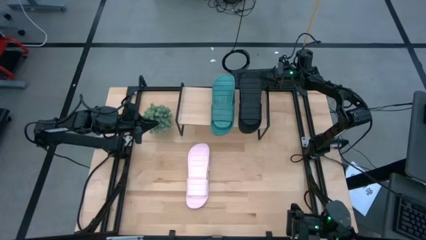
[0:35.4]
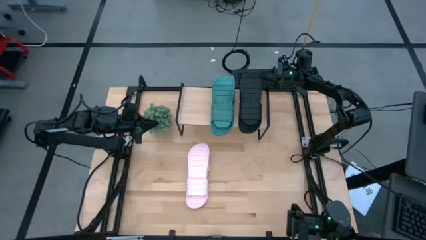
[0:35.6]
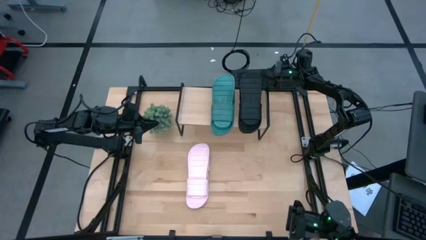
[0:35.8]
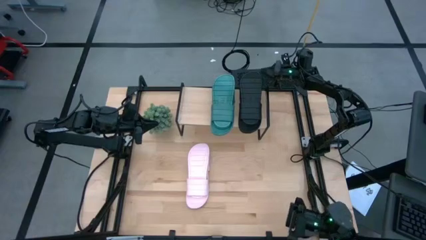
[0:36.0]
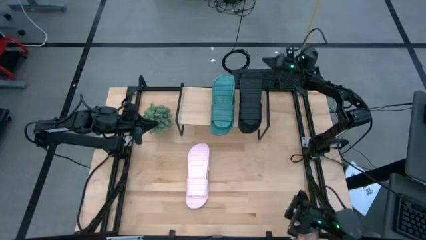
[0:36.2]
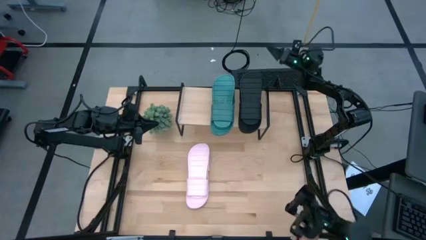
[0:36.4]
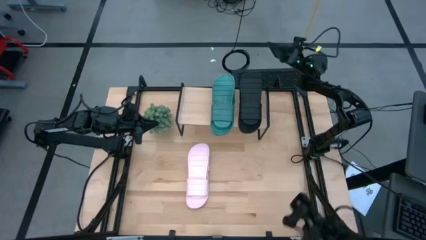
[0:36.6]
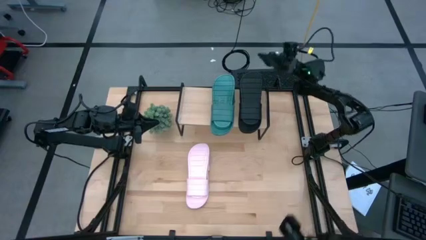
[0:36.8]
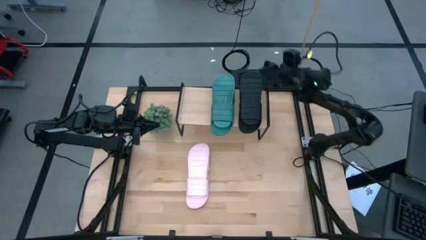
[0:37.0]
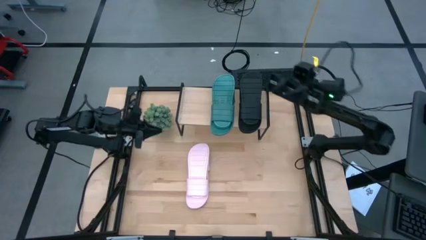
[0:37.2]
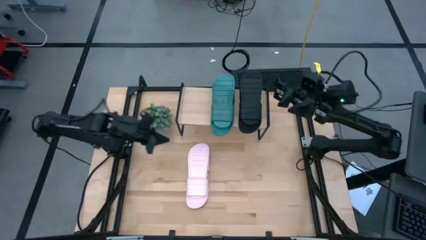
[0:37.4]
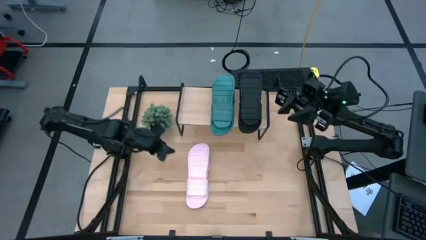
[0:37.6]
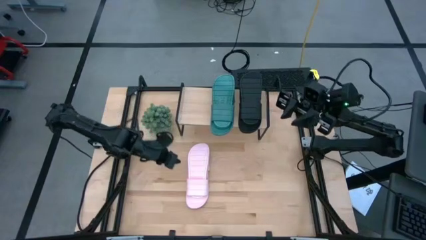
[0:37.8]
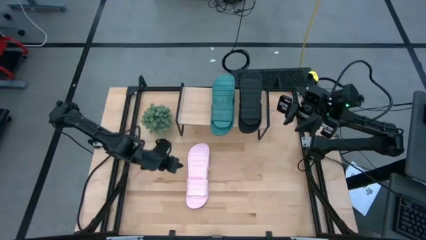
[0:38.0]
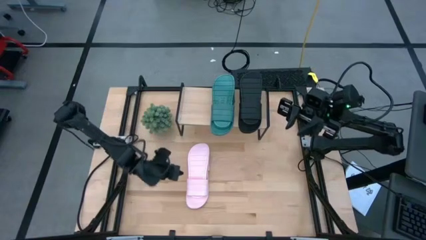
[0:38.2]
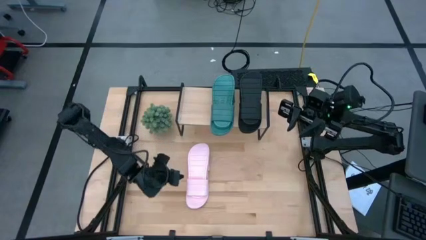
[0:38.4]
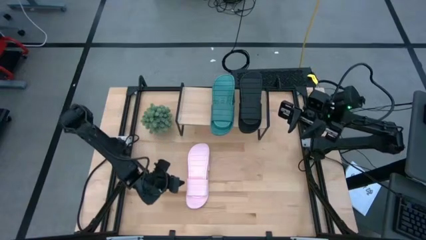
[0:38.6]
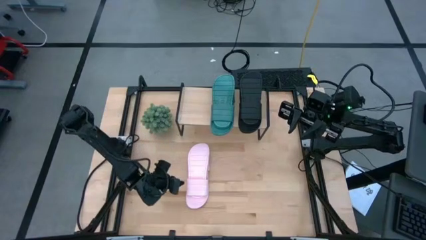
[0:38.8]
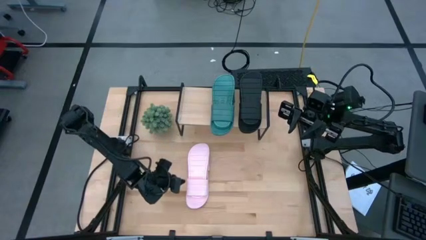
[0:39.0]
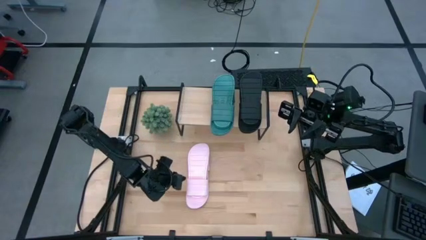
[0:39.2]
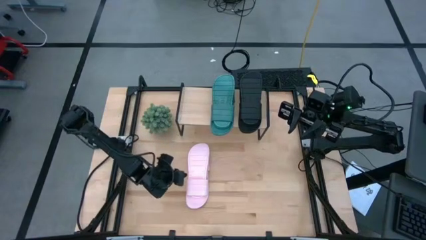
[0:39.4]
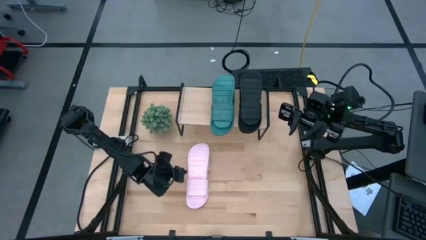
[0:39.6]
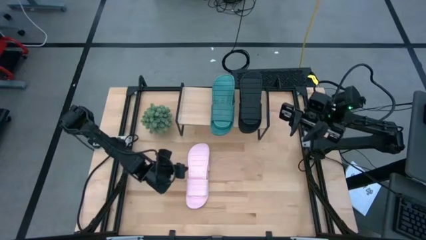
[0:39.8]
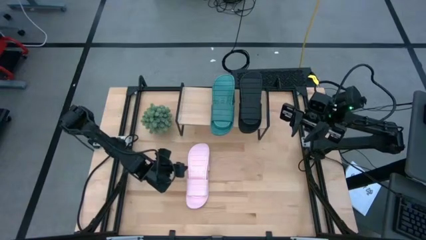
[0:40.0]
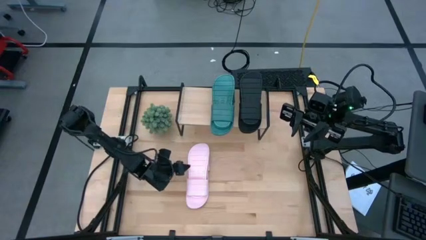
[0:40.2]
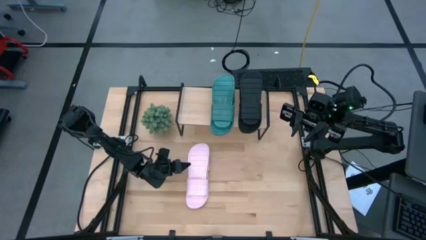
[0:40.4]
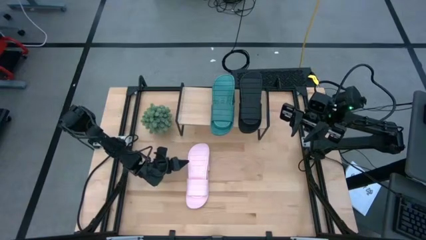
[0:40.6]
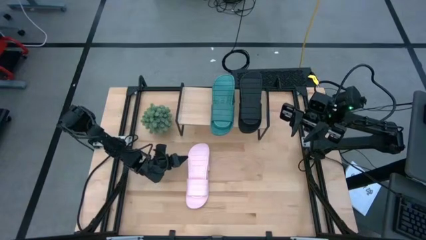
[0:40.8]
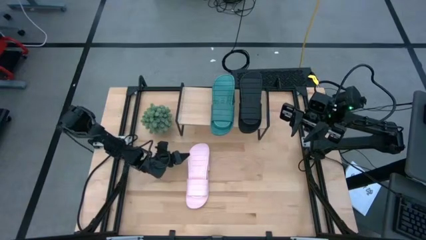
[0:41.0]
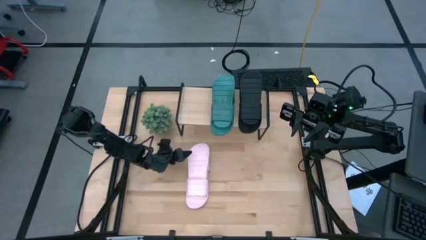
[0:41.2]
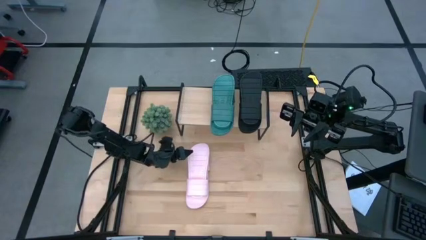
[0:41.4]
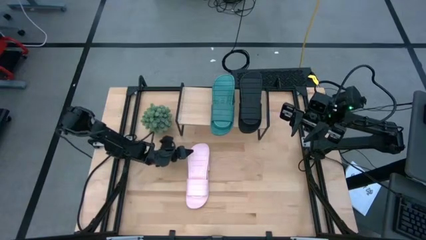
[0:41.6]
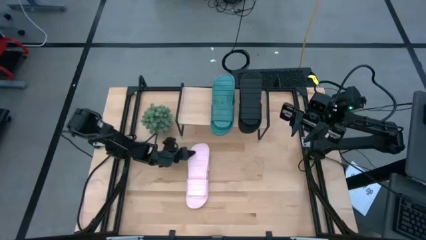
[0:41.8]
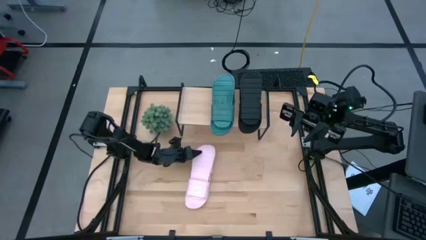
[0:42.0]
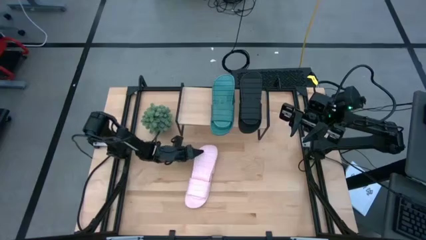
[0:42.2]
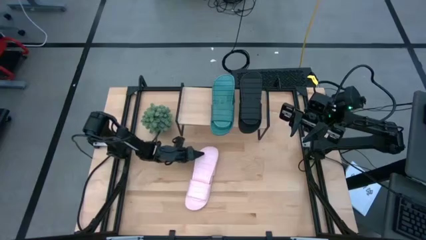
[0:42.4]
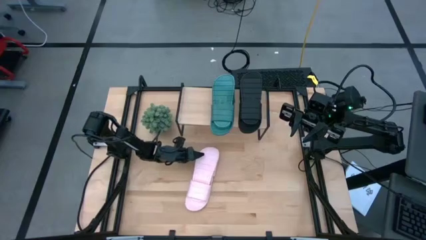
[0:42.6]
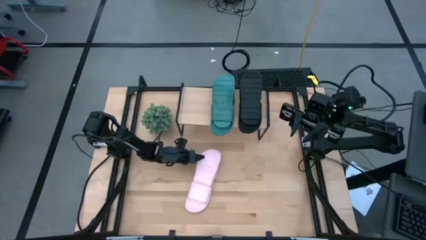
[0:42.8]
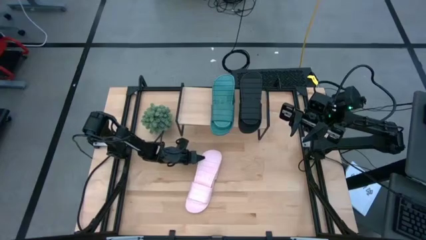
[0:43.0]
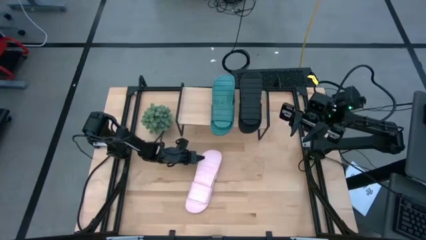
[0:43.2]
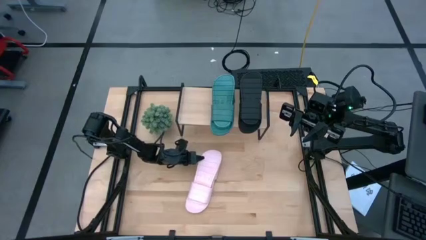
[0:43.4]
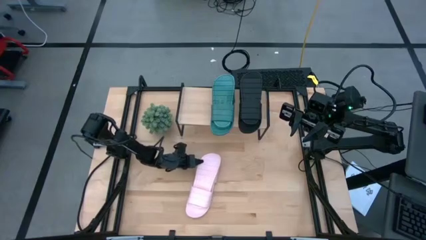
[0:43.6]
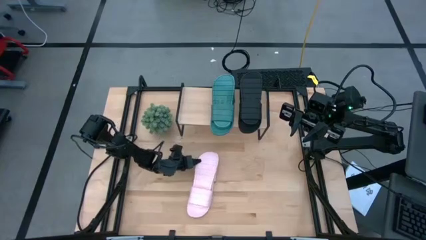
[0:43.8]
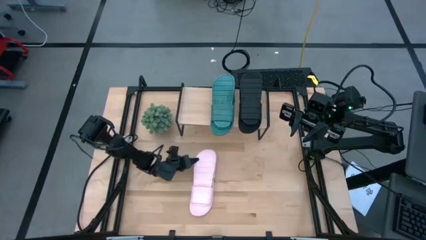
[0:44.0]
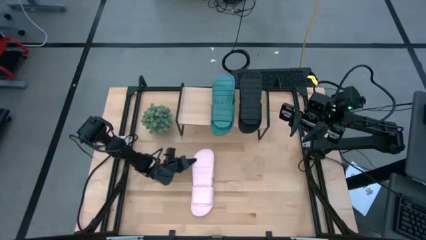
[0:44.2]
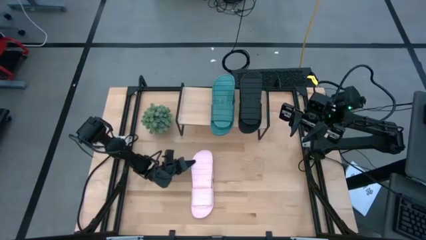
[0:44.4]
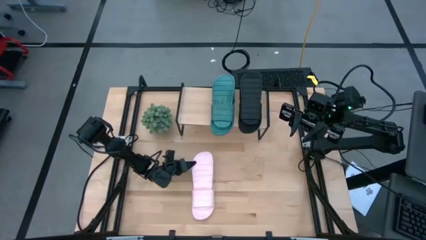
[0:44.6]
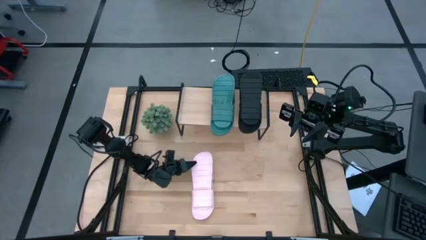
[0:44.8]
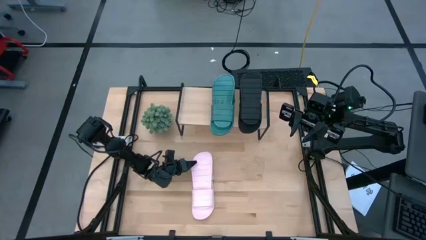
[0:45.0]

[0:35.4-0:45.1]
Task: Pick and place slides into the shelf
Put the pair of pink slides on the shelf

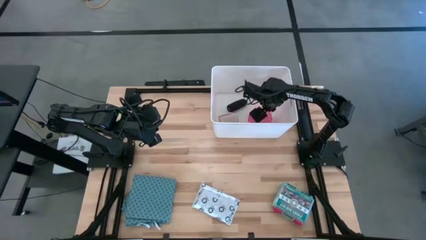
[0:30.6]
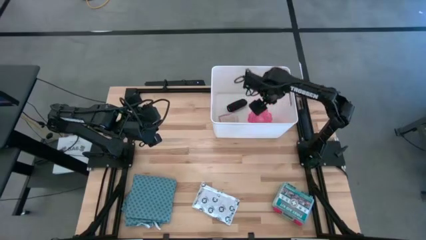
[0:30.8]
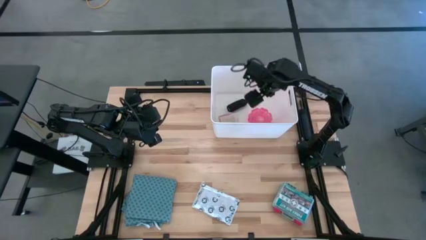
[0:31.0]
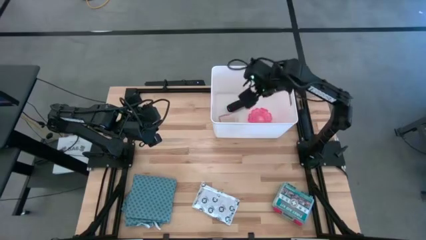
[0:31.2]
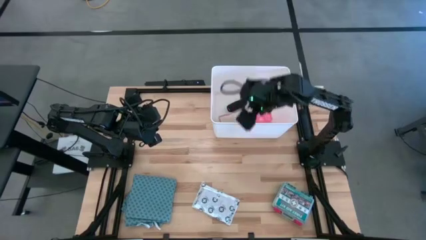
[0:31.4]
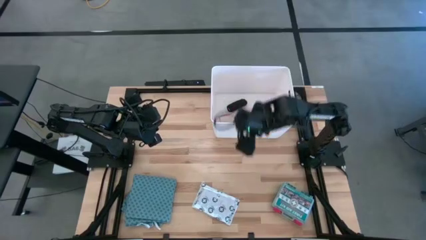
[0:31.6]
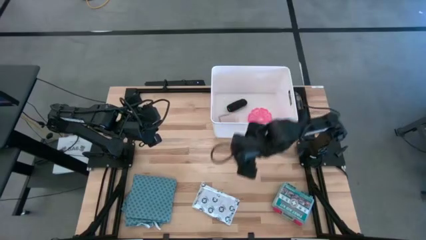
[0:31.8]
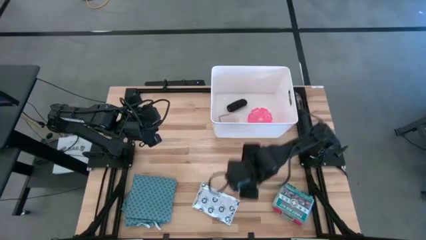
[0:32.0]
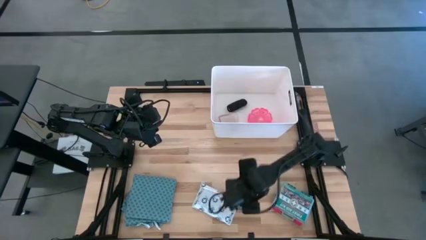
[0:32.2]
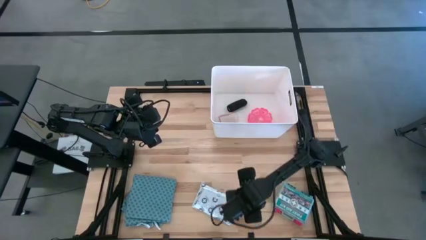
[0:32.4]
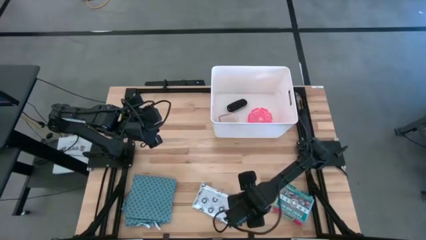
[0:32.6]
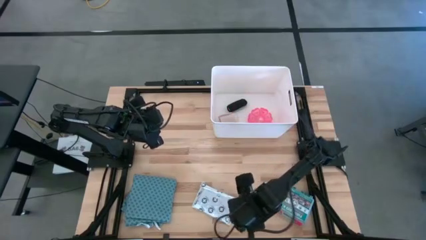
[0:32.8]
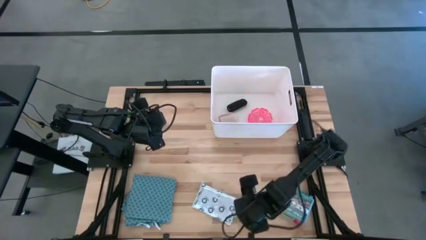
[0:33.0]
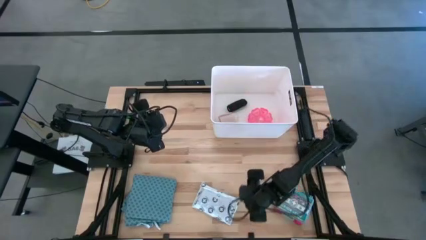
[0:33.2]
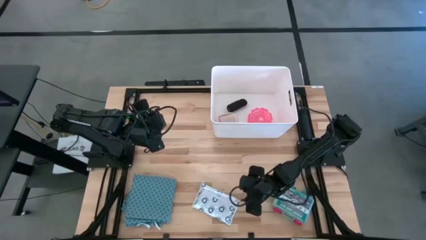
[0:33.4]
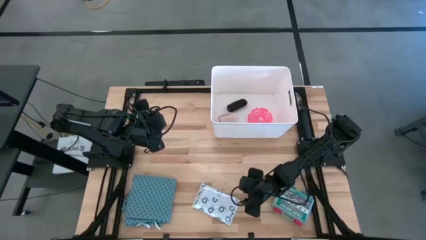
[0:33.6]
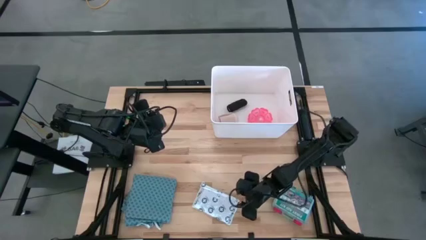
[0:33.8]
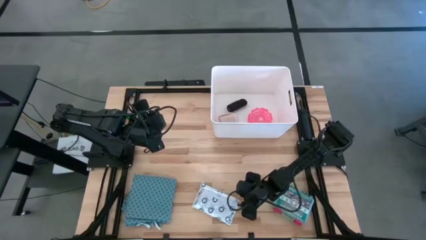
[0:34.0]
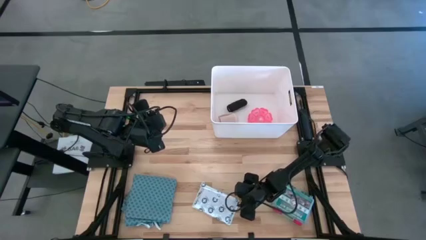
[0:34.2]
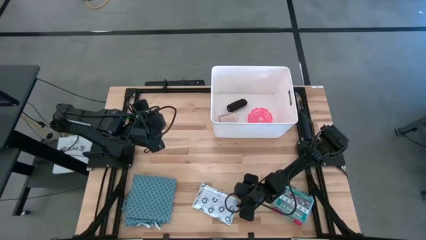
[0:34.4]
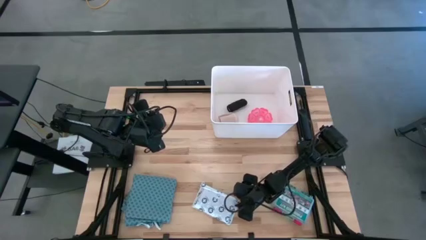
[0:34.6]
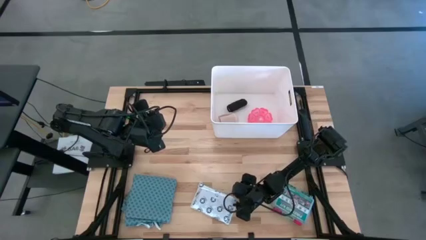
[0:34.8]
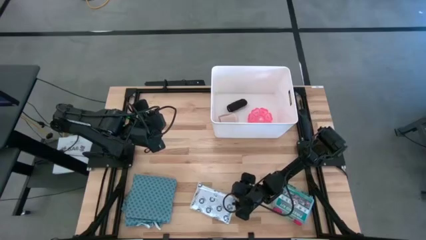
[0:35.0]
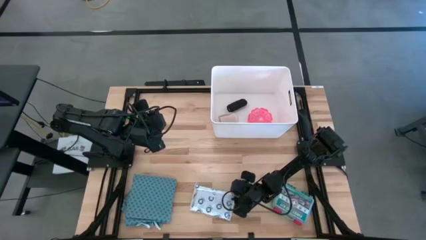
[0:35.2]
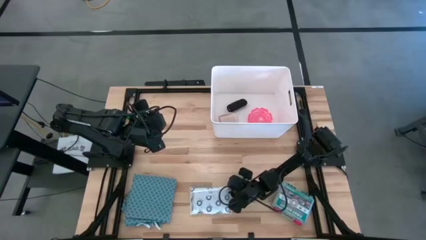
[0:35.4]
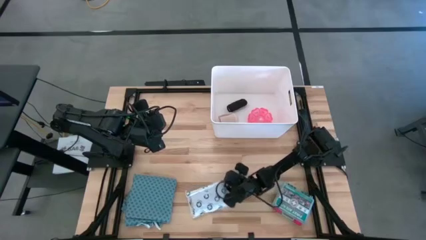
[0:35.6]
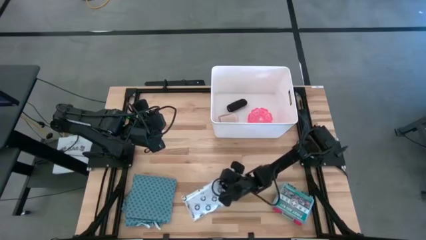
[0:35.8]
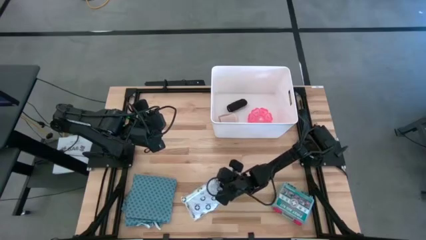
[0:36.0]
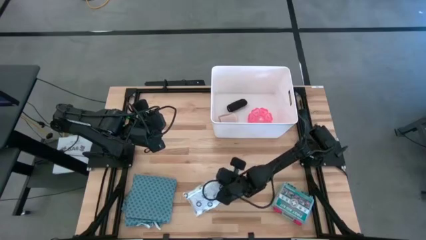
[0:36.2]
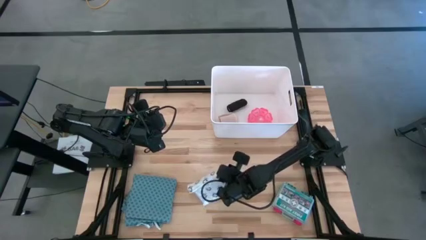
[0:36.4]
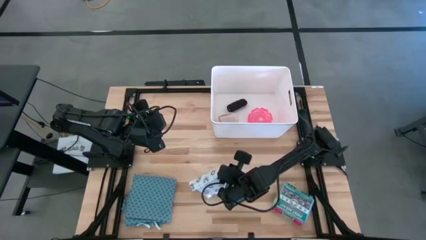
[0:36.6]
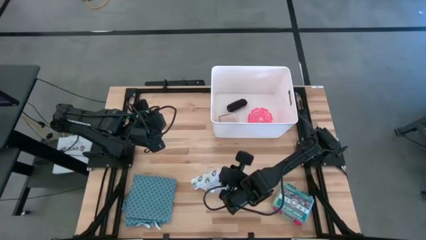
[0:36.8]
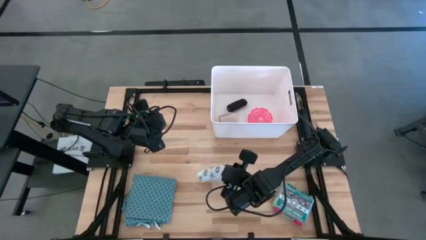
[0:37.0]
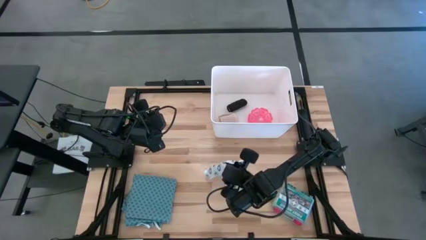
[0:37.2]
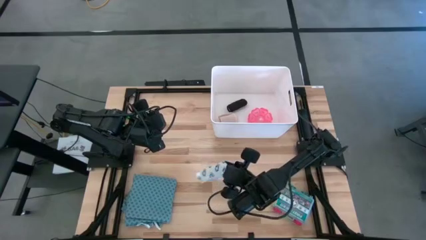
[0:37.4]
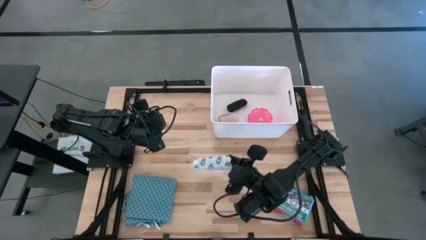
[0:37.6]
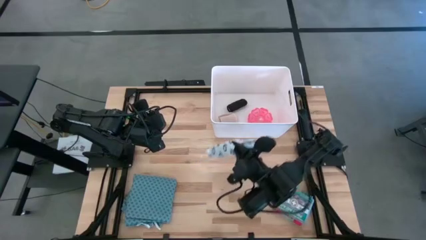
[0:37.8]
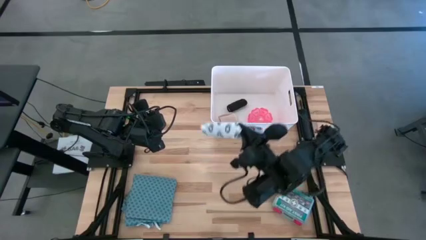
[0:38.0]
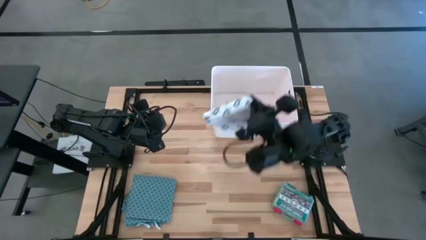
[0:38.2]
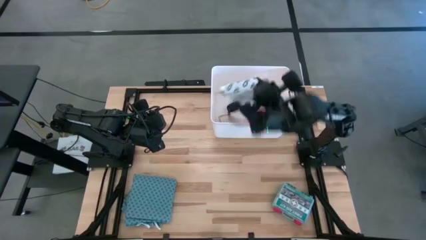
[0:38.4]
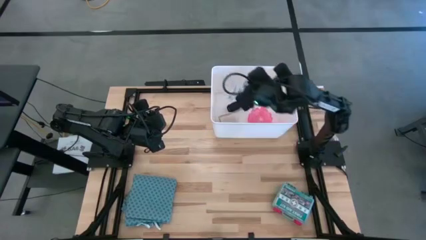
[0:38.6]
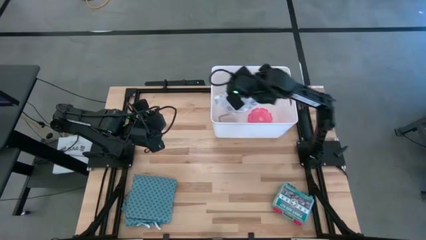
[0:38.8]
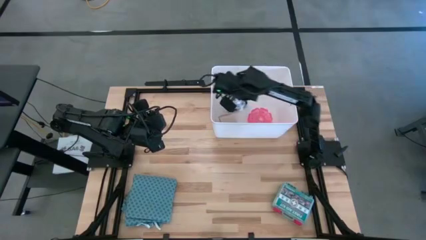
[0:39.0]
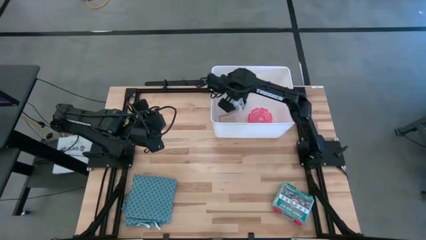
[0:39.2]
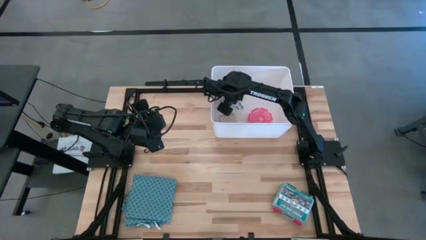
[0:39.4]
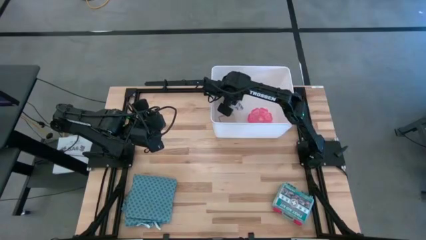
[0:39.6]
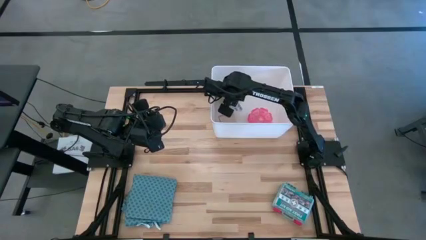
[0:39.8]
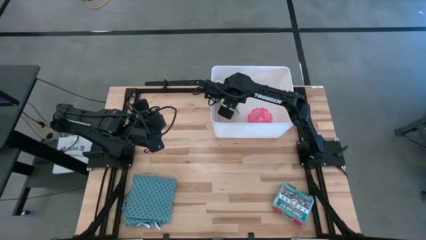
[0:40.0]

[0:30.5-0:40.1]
Task: Pick & place medical supplies in basket/bin
Put the white mailer bag in the white bin
